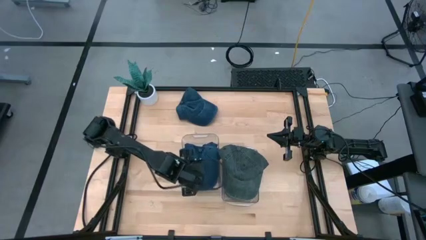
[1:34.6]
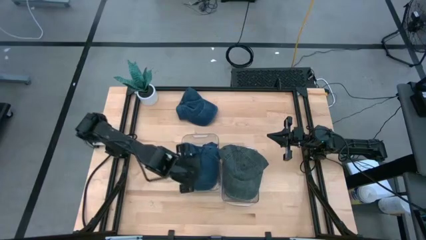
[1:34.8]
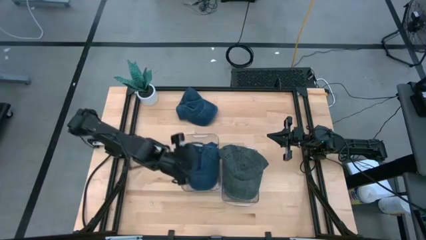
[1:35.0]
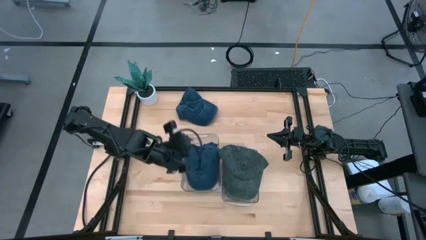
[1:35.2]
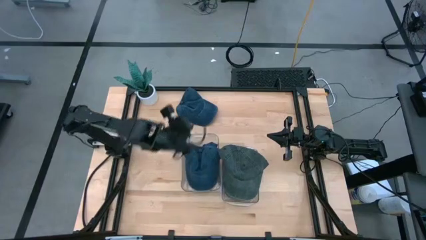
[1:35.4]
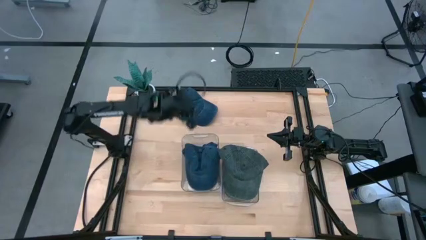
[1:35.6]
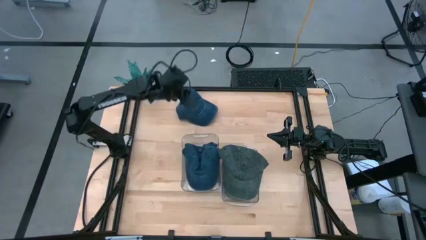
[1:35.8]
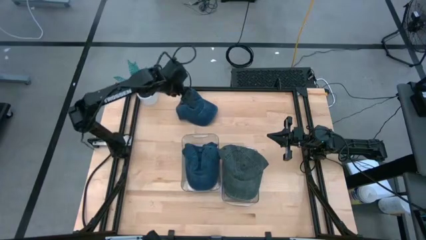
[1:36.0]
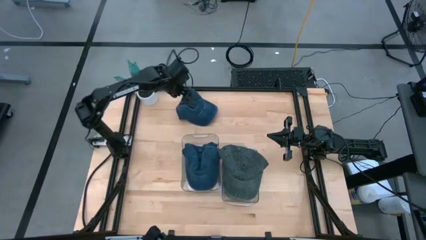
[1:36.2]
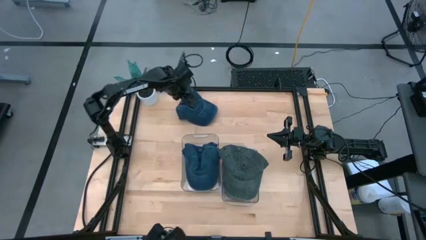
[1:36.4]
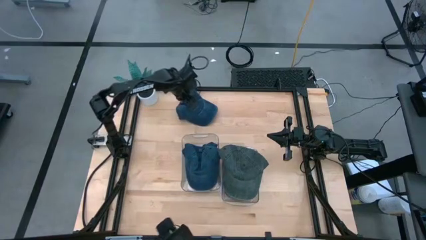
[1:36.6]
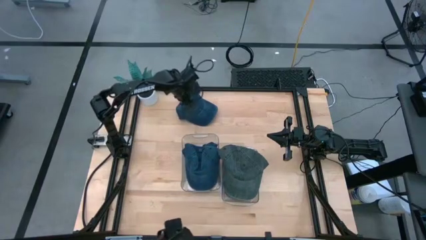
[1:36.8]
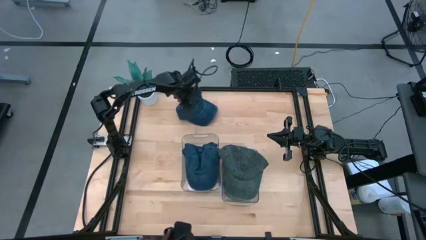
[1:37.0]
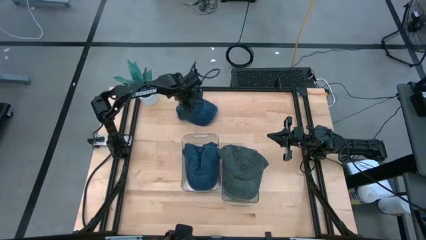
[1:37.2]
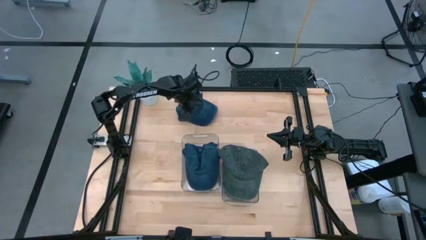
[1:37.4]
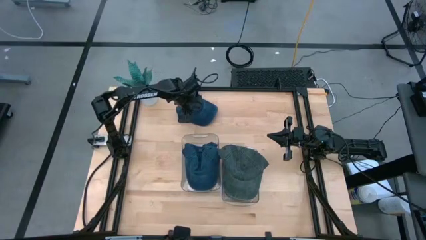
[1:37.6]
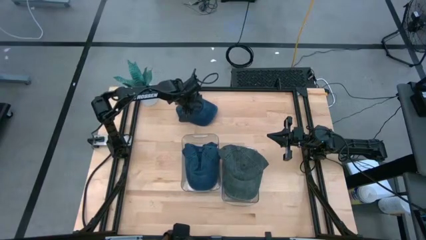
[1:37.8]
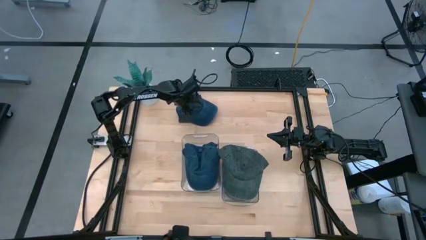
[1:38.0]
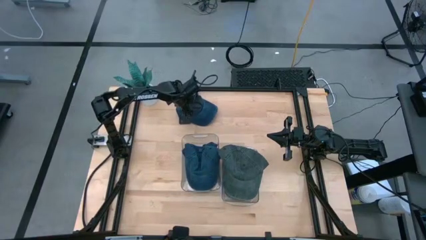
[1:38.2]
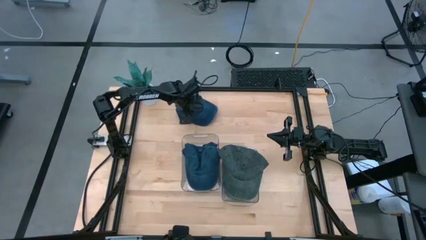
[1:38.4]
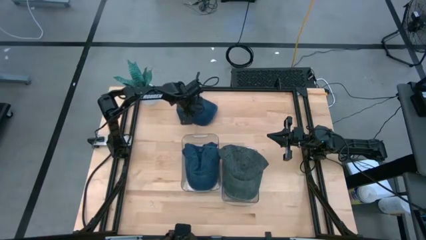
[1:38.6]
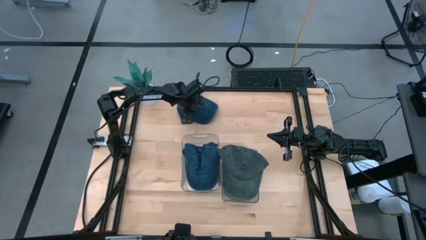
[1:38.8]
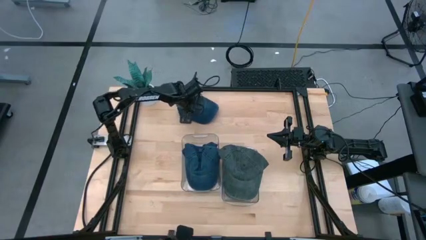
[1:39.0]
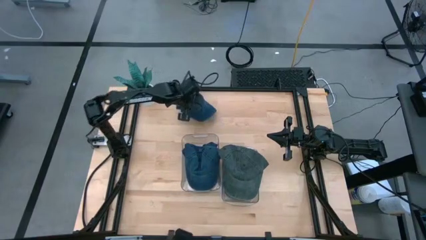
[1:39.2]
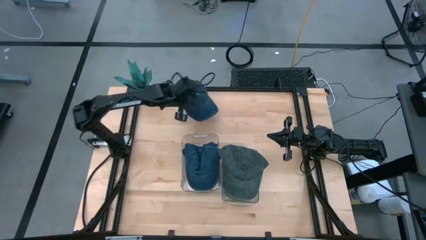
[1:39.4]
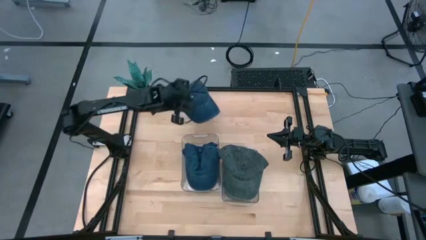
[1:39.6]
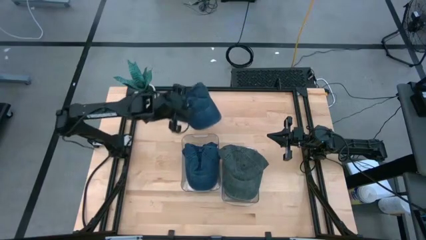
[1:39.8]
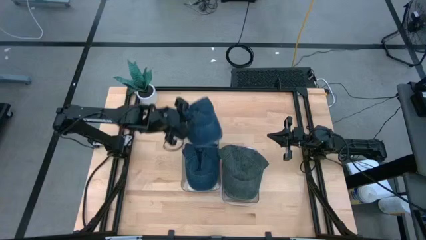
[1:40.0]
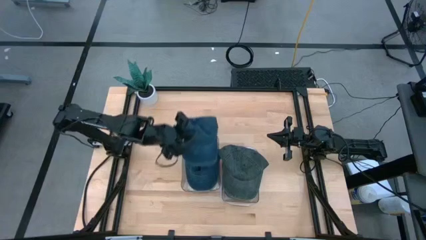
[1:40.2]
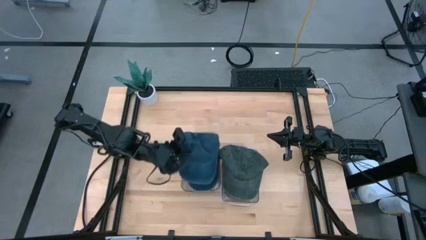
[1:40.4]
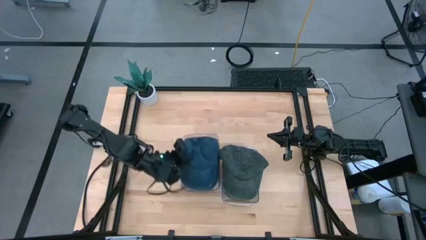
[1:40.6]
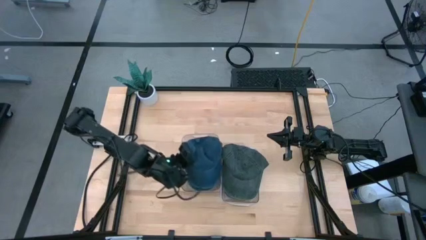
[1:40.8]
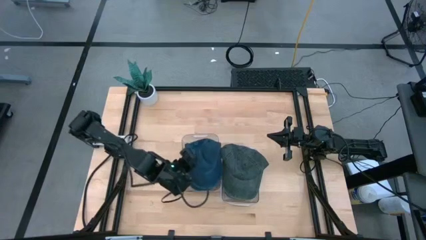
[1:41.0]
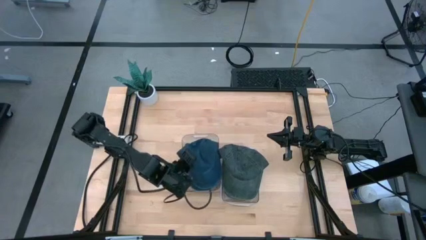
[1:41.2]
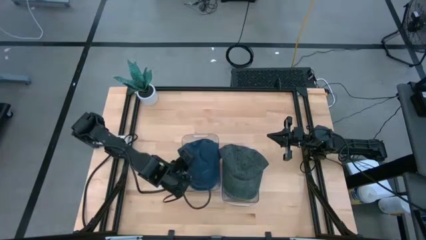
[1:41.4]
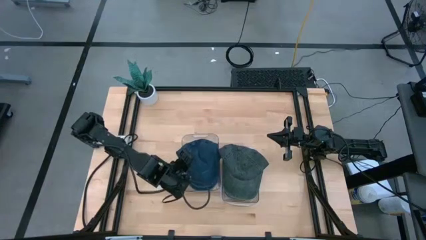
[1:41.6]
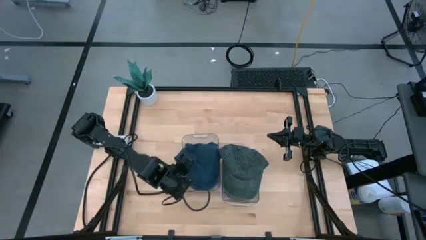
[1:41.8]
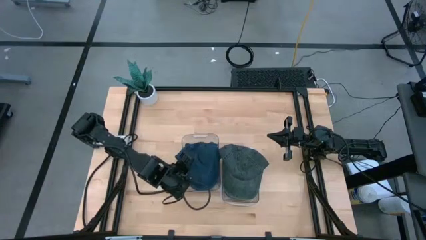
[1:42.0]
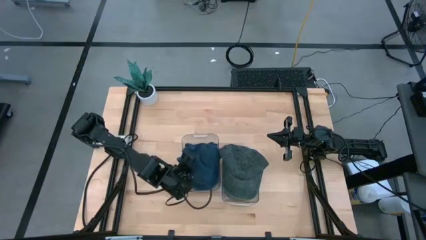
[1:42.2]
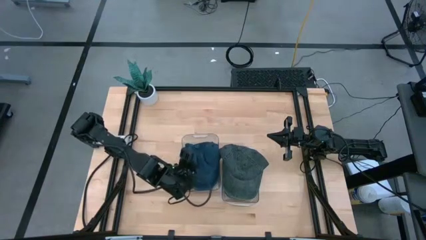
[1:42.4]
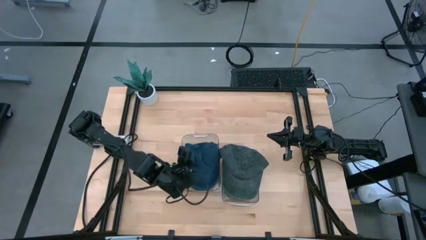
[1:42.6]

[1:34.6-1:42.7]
Task: Pick & Place hat
Put the blue cap into the left transparent bin

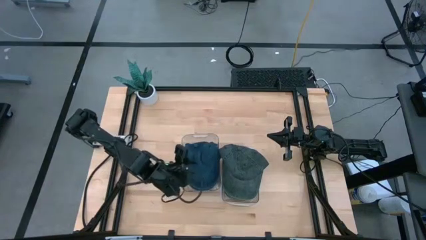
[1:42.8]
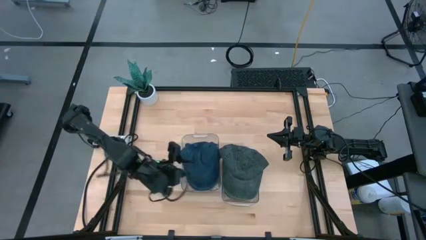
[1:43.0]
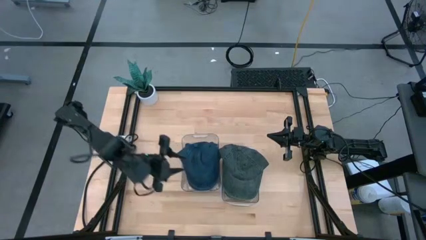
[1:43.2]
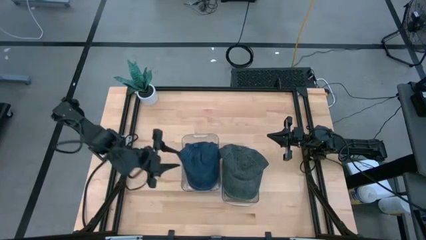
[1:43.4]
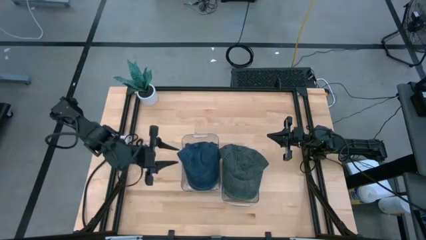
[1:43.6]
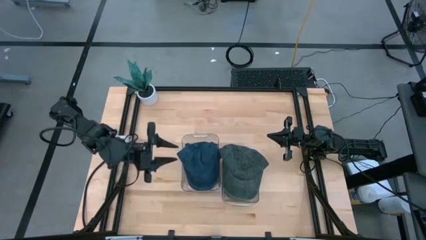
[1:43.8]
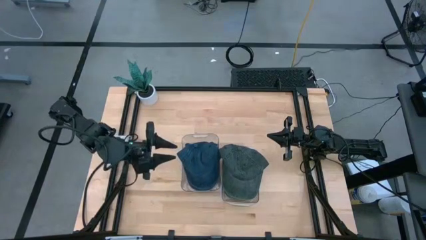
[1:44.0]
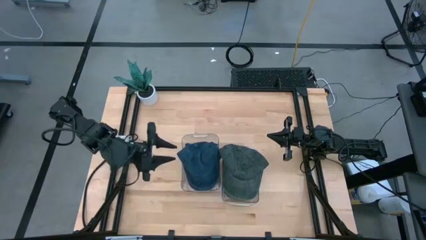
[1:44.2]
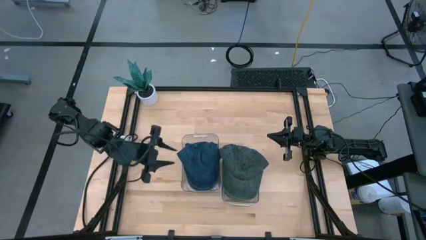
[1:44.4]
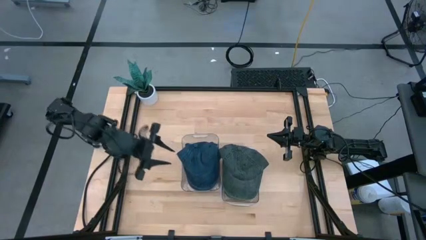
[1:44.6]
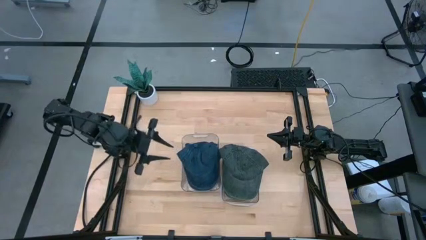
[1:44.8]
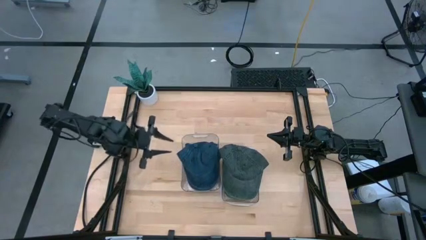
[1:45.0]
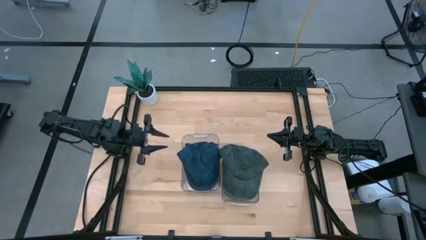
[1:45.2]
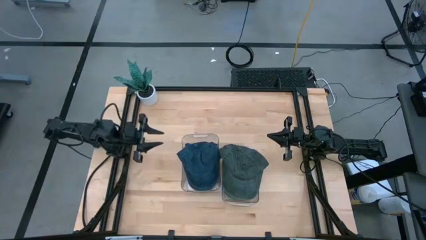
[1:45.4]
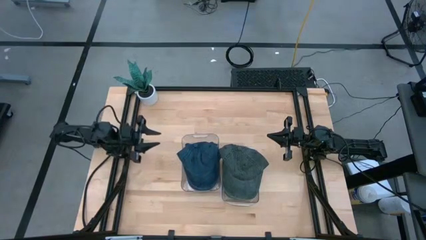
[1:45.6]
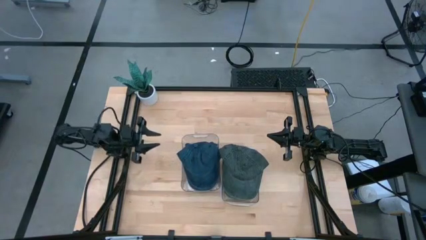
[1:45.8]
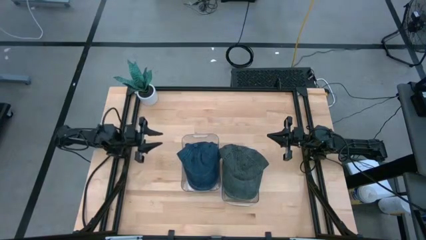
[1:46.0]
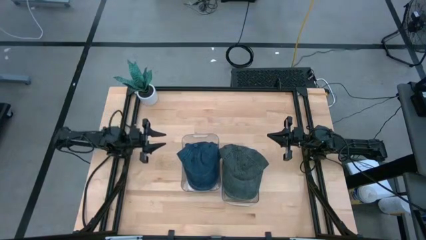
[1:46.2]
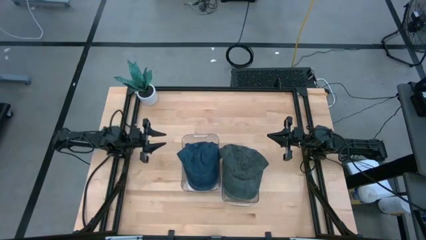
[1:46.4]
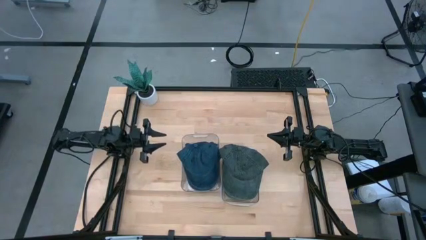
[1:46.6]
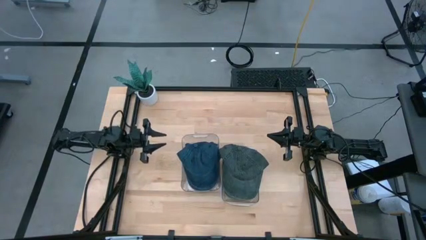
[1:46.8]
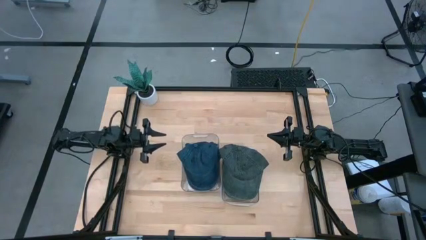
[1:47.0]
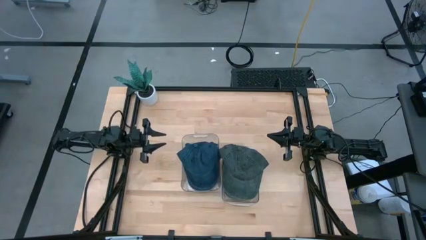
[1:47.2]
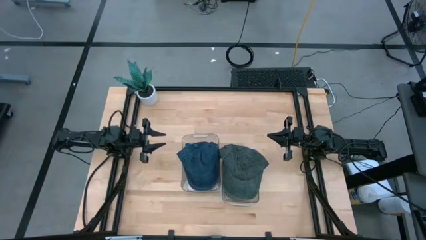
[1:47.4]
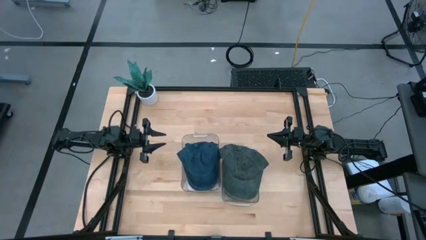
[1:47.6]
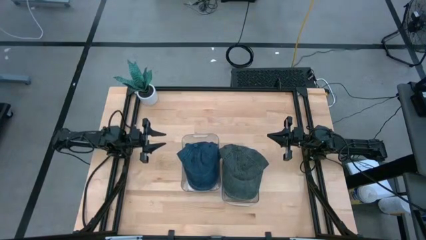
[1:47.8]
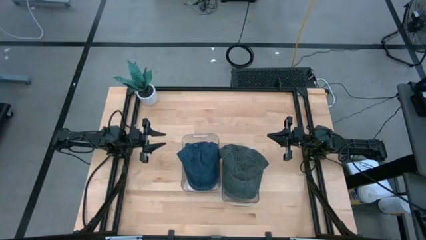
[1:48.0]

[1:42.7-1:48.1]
Return to Home Position

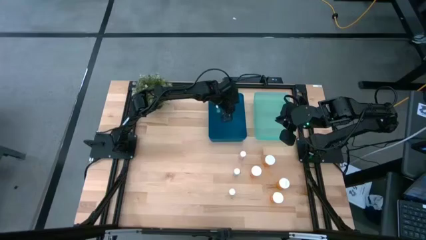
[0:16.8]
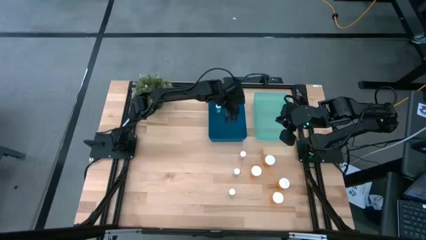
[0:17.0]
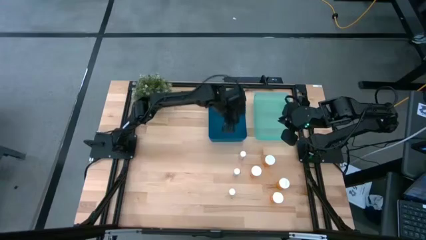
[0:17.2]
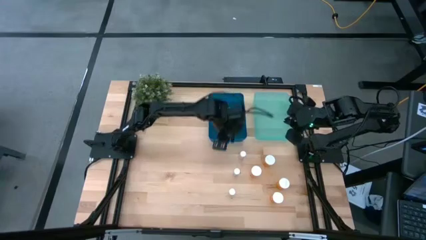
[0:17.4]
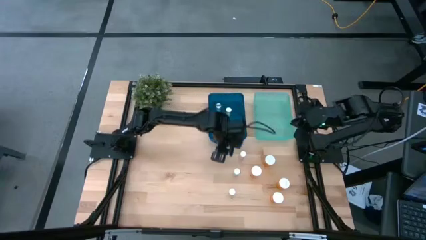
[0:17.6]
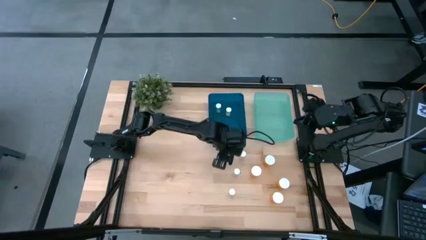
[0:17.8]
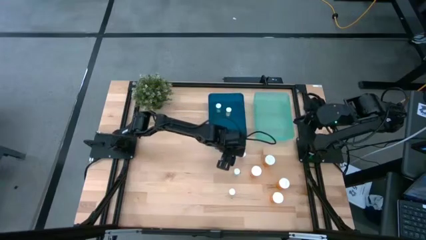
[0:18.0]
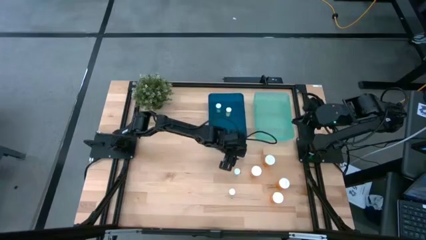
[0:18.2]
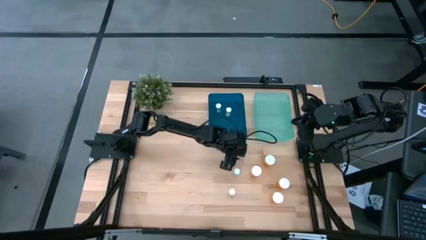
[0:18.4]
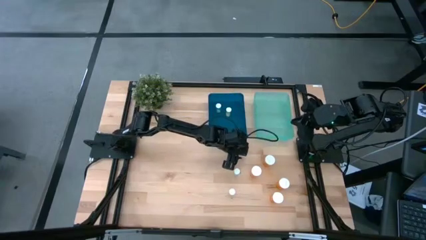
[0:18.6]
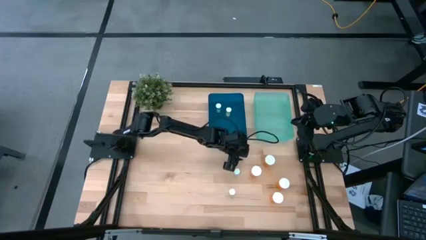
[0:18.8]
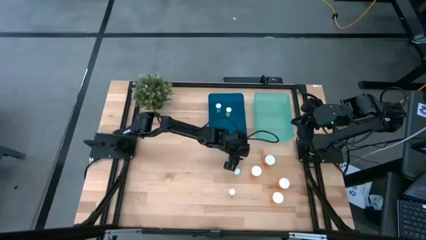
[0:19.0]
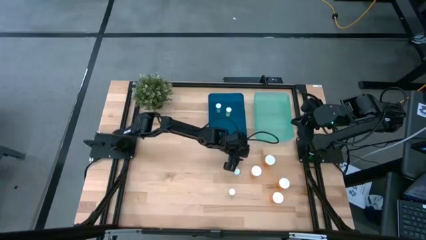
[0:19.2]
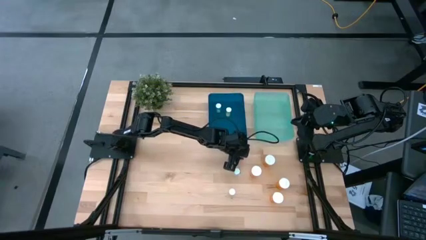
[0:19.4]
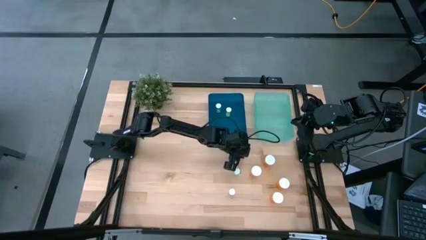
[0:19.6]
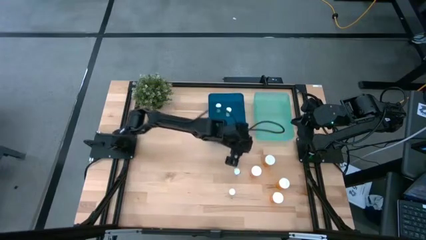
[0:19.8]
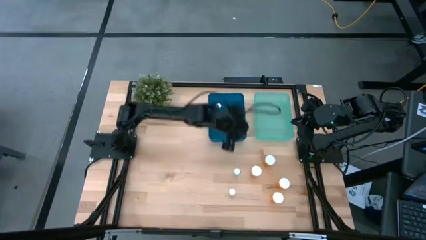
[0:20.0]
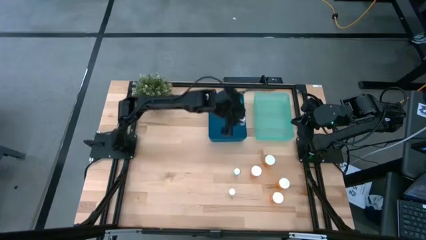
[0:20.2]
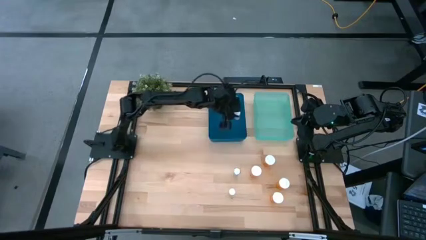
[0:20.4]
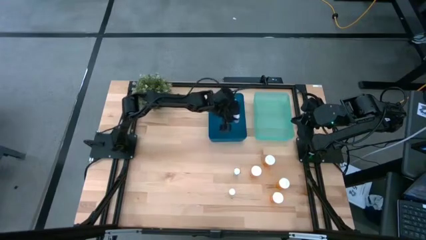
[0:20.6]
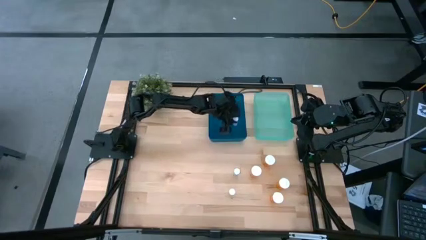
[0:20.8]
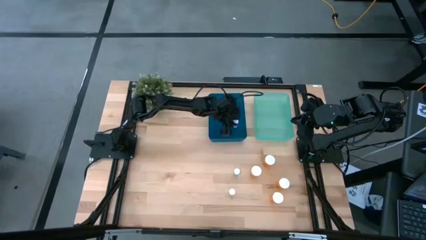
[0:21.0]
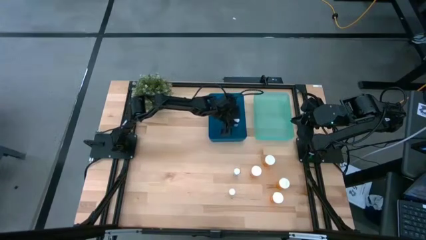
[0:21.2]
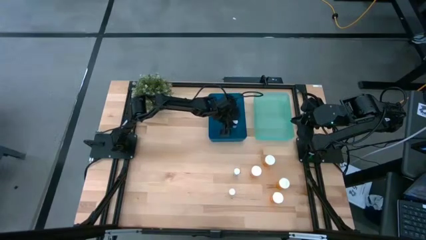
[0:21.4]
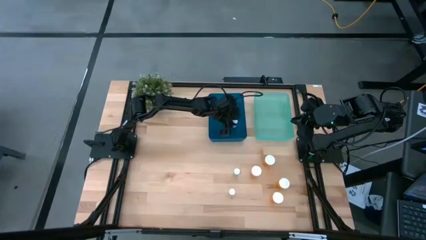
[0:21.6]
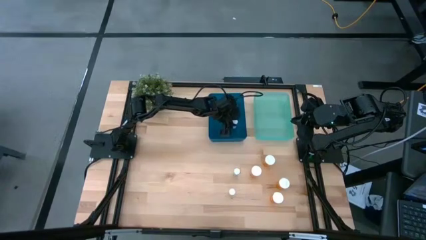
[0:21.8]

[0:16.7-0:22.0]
Task: Pick and place medicine bottles into bin by pill shape (circle, oval)
Put the small pink pill bottle into the blue bin
